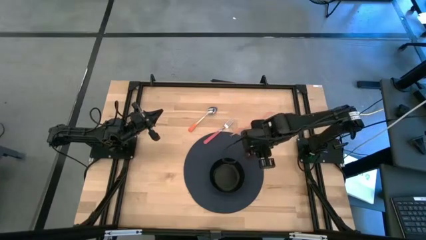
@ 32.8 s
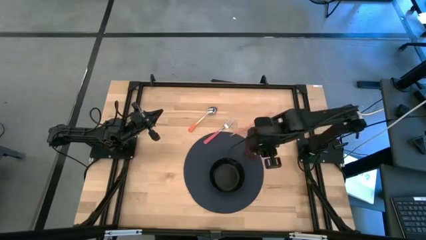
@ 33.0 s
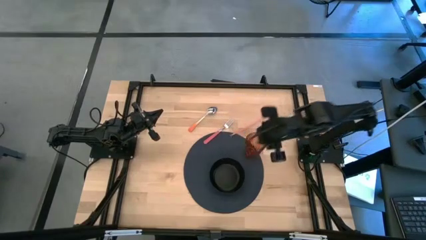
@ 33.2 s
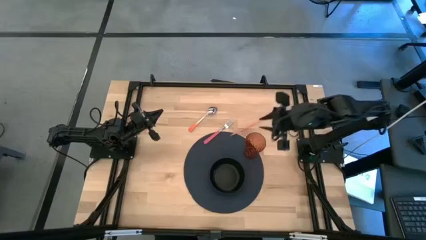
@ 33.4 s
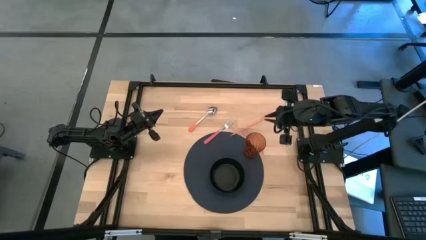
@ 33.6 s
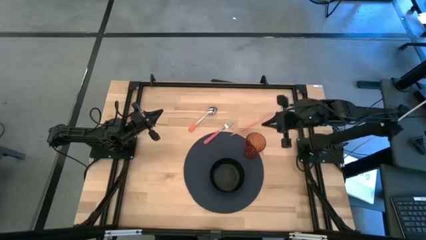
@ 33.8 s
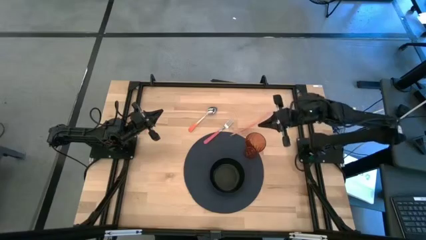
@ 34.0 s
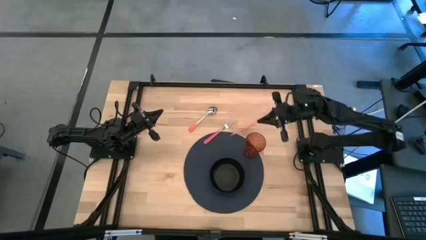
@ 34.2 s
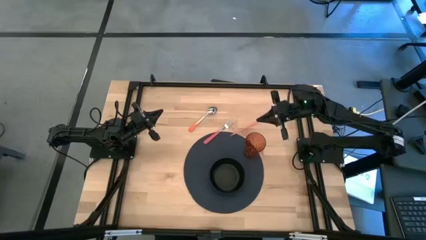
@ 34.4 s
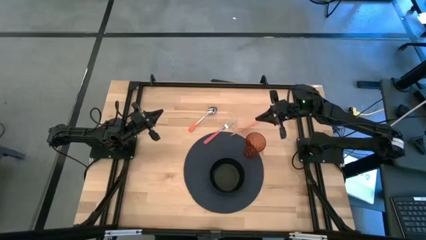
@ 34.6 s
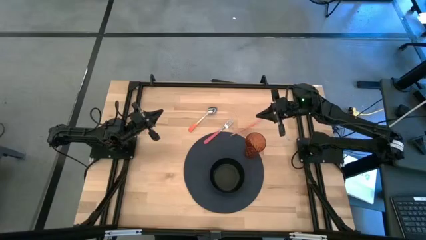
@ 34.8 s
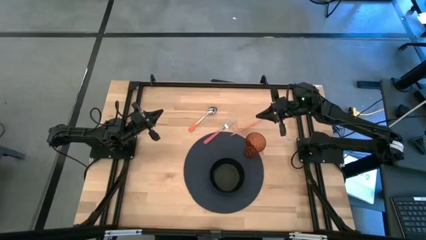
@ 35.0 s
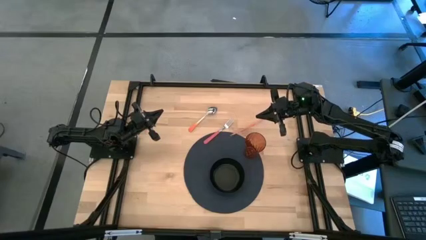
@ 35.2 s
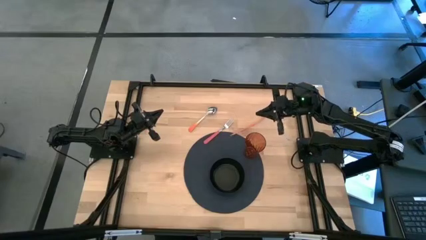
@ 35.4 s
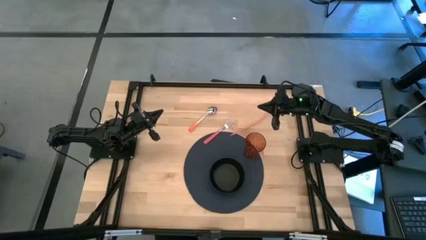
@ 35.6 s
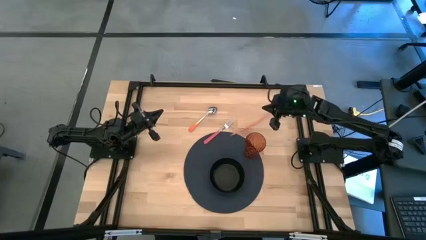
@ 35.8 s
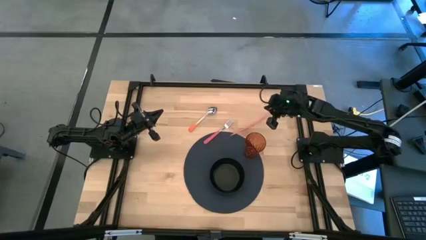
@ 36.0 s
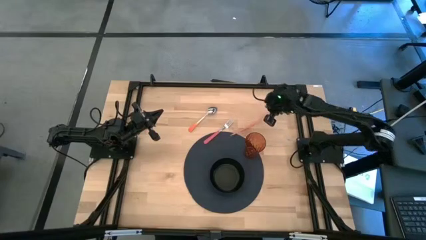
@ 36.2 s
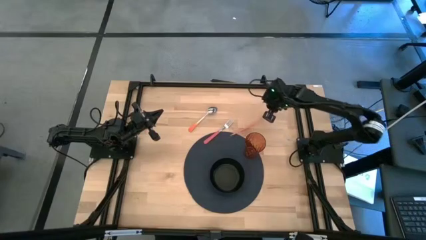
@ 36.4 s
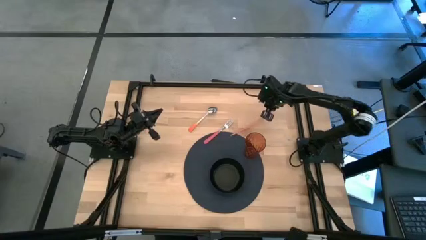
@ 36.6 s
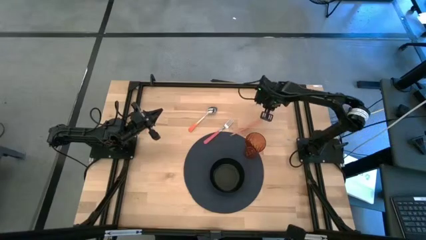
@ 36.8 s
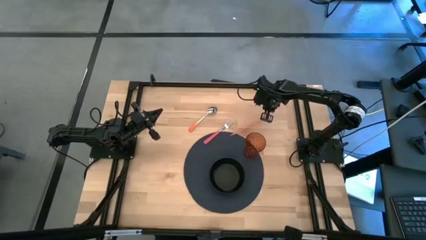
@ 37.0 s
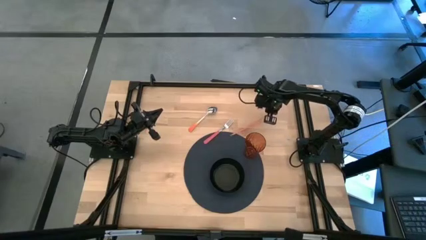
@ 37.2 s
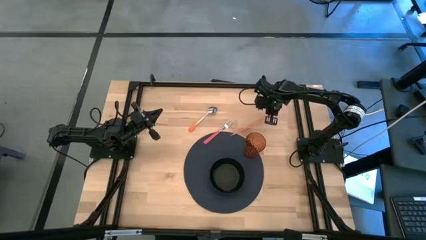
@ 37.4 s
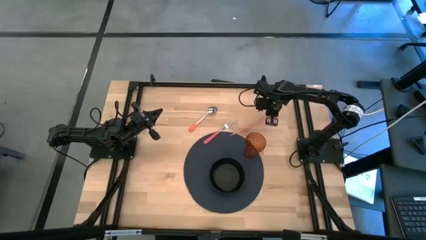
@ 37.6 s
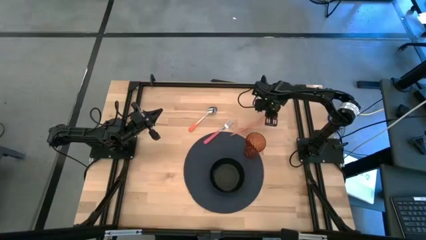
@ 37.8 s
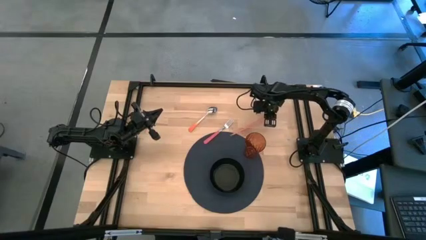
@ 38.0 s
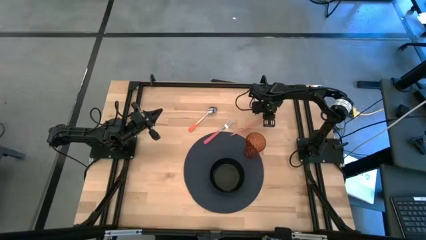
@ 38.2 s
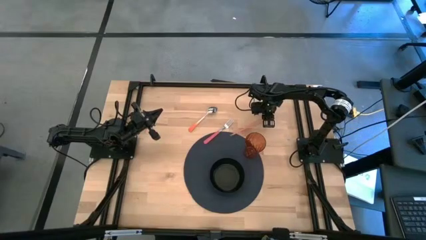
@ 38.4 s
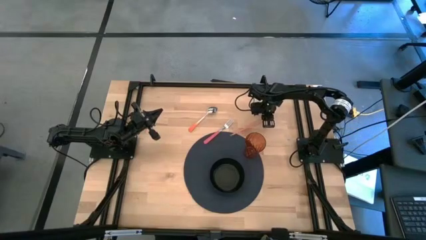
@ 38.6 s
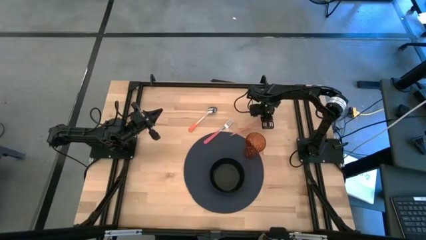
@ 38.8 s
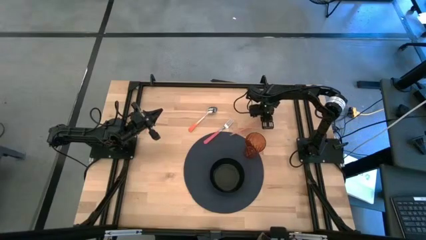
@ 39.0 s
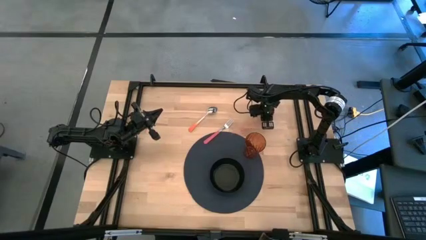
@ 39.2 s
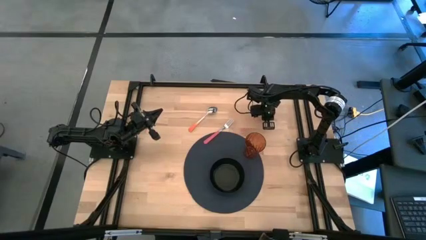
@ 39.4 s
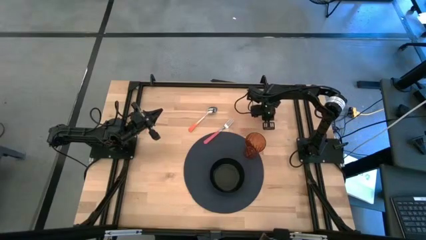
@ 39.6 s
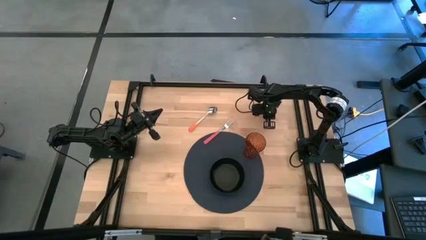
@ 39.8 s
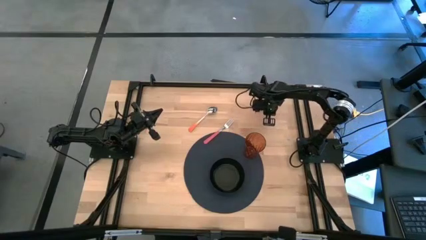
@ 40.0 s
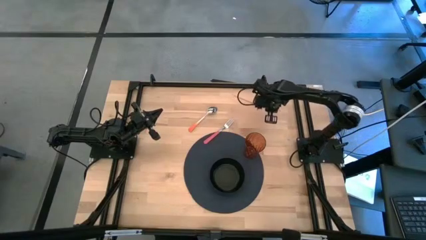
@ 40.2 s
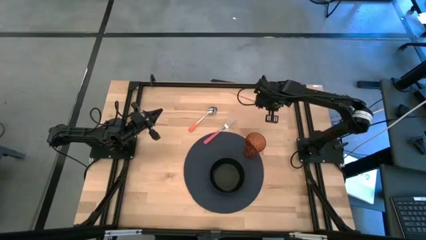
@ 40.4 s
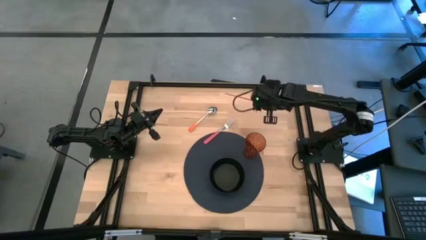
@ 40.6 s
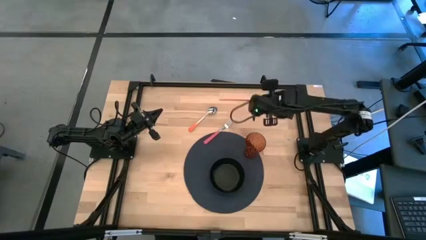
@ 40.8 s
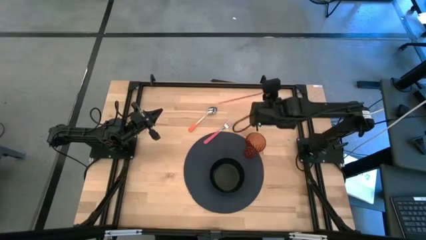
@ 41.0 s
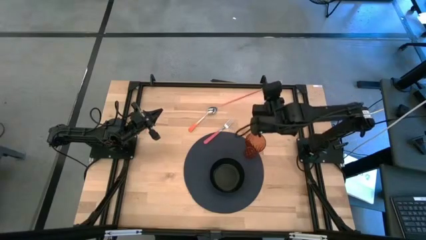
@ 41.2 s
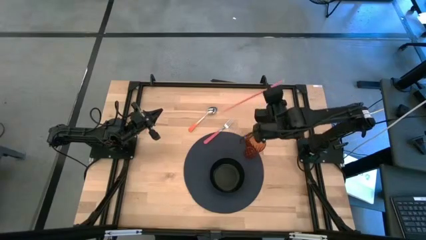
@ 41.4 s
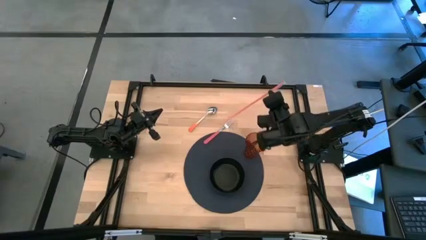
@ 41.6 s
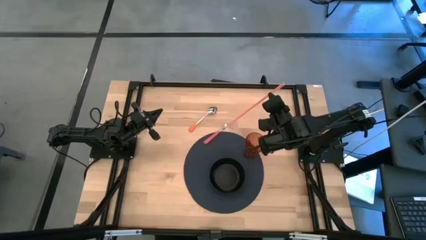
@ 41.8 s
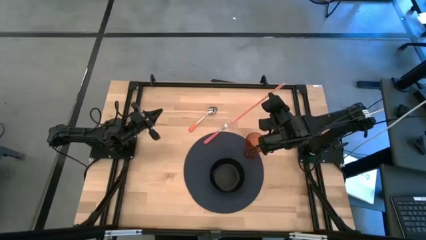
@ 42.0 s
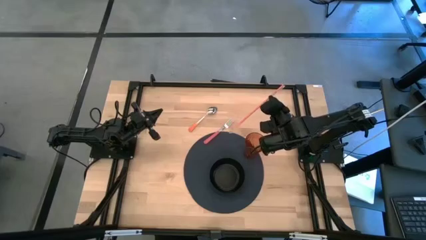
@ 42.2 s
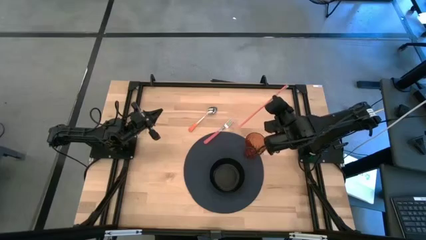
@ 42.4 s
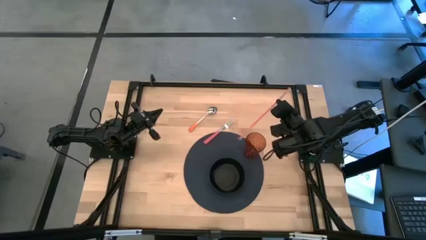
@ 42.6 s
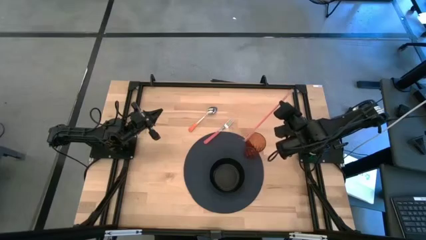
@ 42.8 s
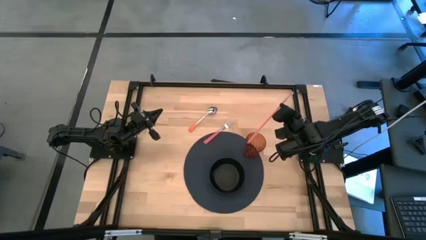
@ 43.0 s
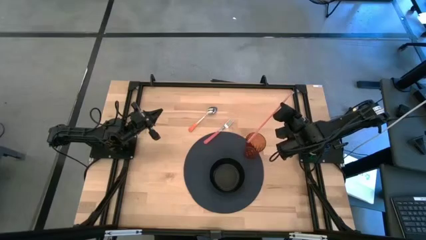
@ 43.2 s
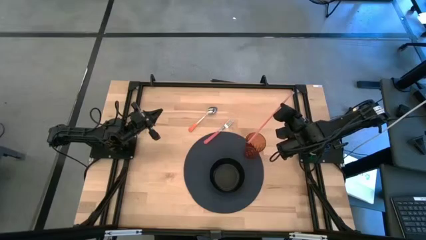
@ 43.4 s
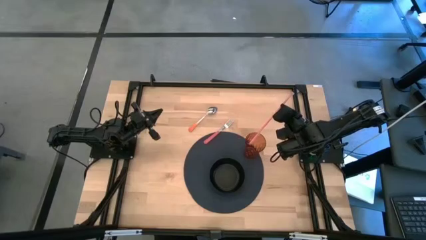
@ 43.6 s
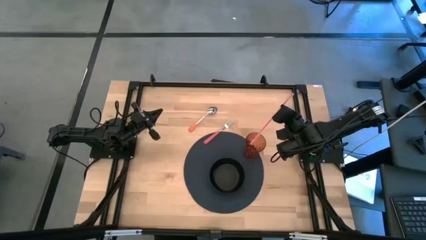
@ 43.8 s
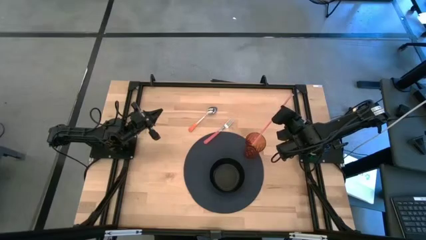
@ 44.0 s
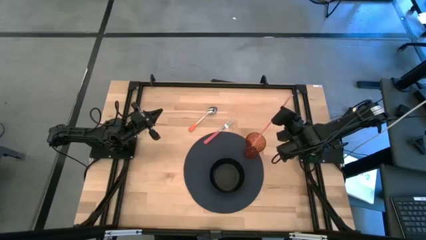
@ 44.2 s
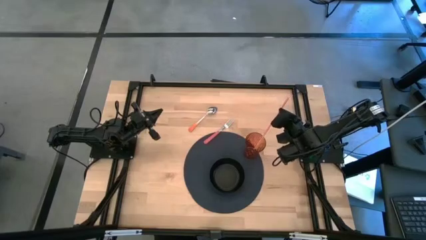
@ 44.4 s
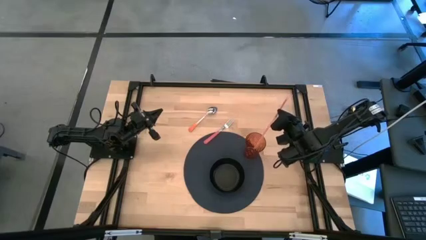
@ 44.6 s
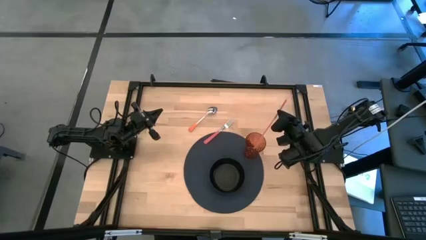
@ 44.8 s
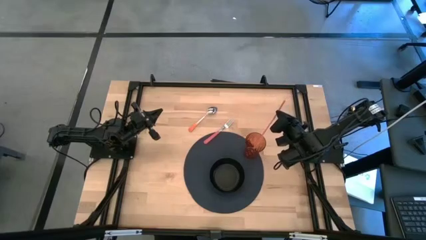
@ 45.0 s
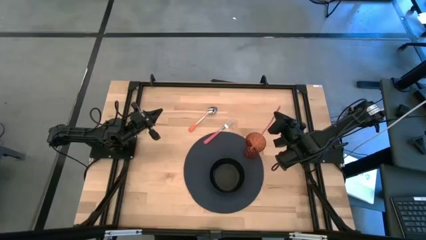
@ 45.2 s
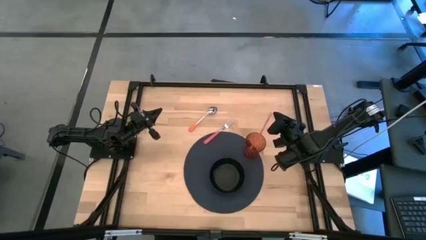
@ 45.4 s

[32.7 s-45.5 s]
Task: Pick & Place Utensil
Put the orange straw into the orange glass on the blue mat
